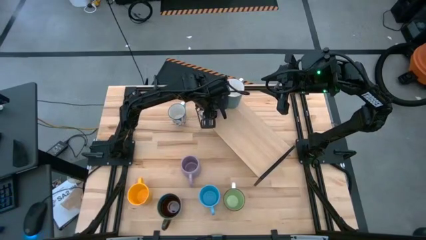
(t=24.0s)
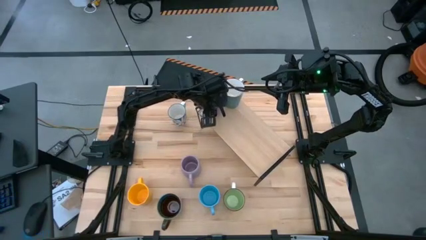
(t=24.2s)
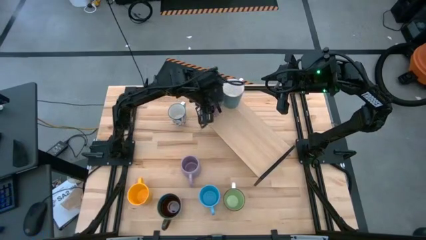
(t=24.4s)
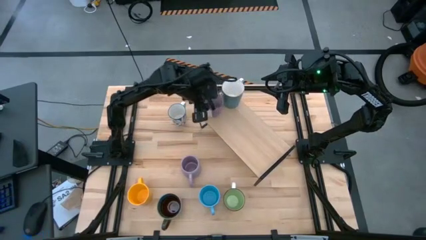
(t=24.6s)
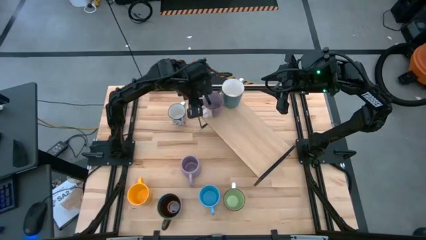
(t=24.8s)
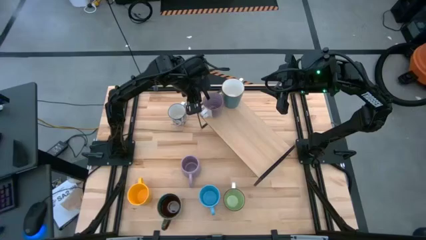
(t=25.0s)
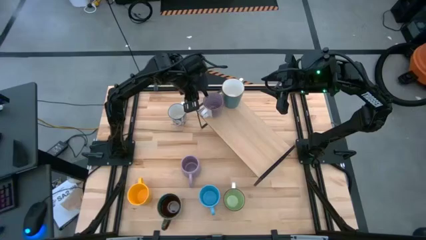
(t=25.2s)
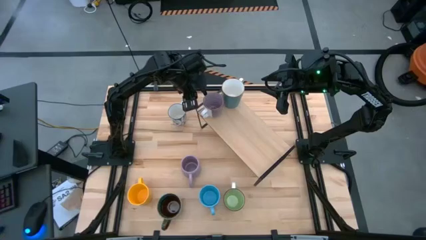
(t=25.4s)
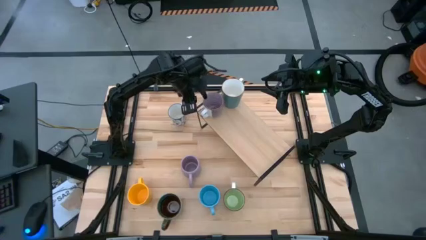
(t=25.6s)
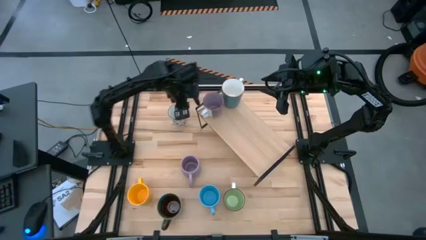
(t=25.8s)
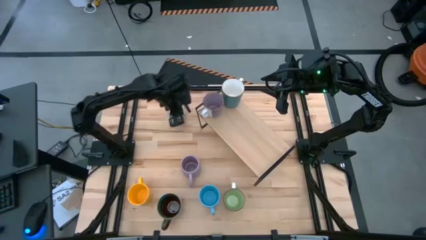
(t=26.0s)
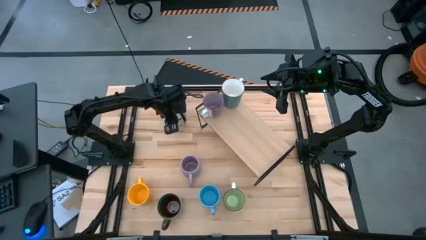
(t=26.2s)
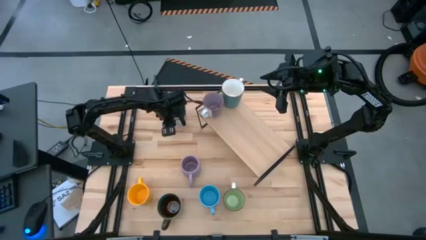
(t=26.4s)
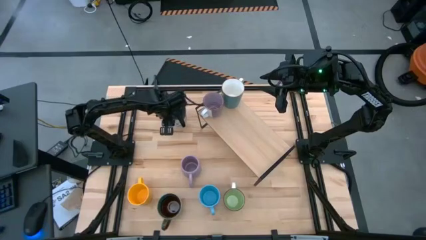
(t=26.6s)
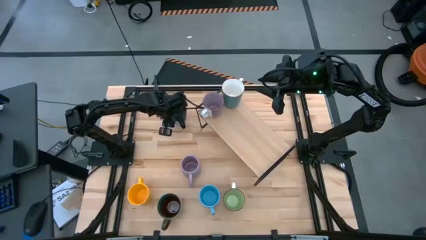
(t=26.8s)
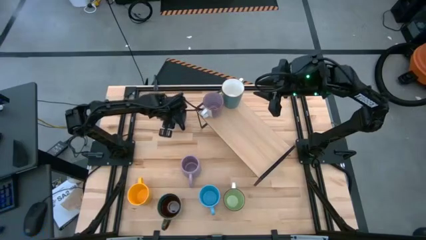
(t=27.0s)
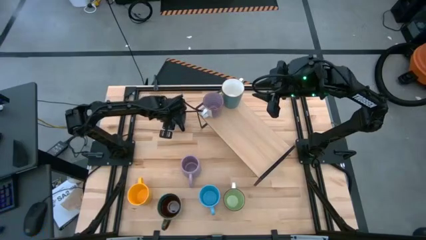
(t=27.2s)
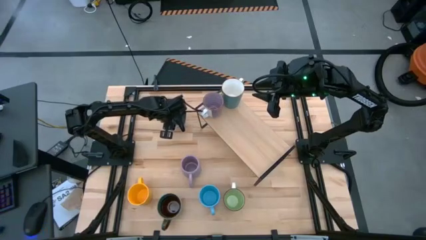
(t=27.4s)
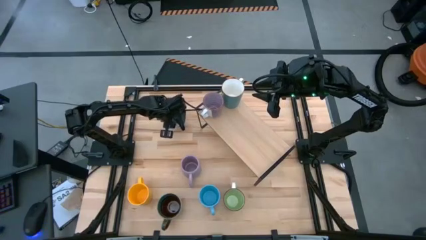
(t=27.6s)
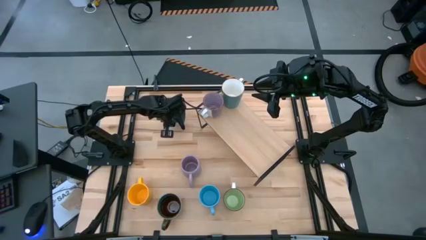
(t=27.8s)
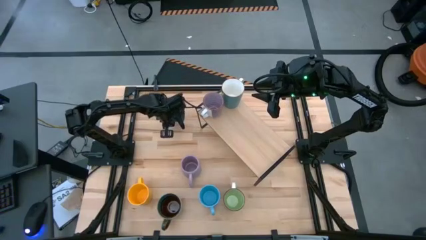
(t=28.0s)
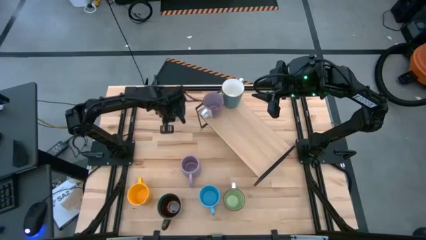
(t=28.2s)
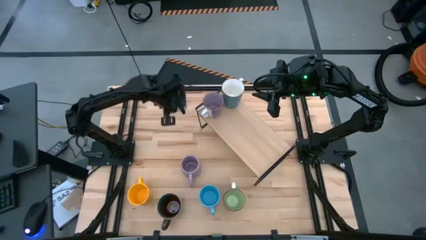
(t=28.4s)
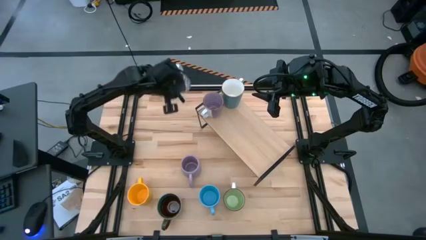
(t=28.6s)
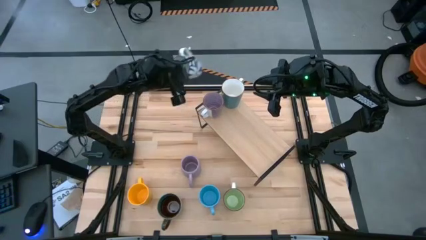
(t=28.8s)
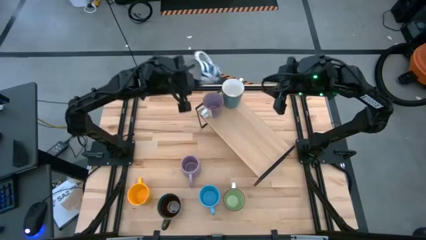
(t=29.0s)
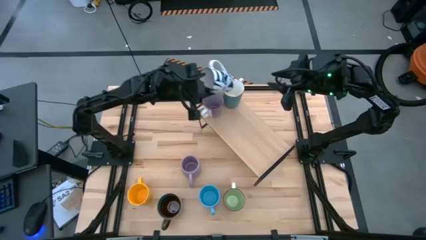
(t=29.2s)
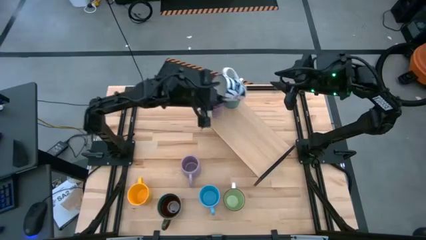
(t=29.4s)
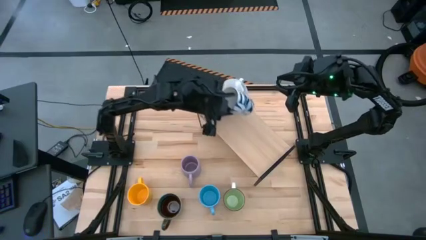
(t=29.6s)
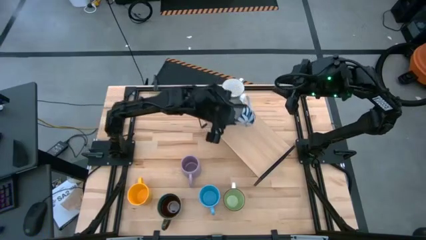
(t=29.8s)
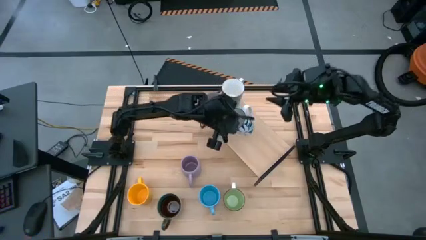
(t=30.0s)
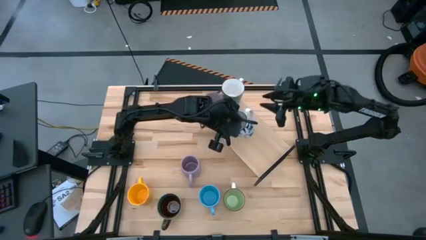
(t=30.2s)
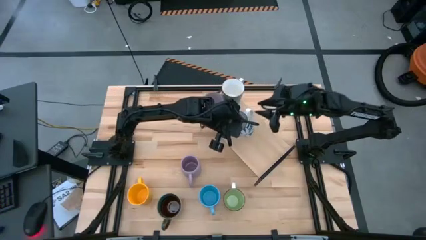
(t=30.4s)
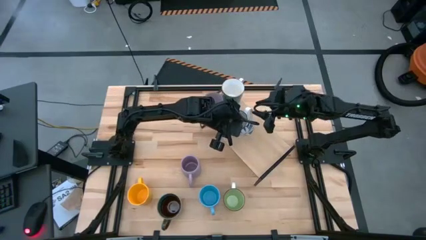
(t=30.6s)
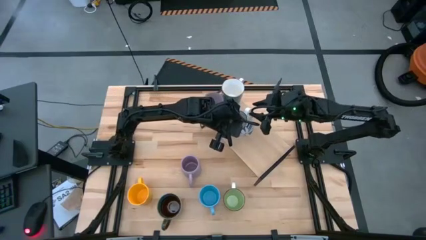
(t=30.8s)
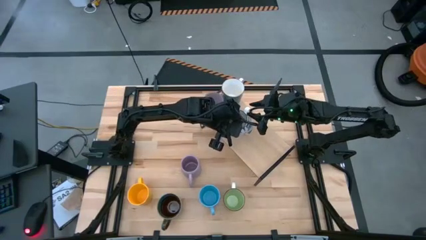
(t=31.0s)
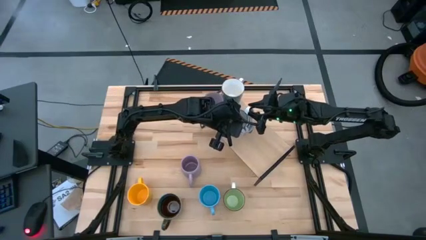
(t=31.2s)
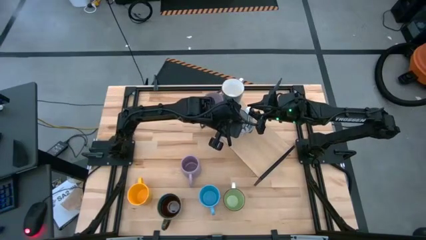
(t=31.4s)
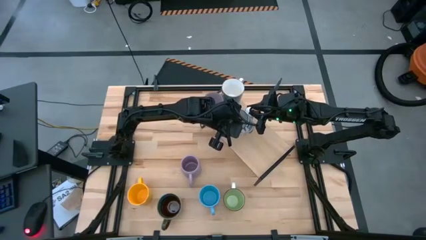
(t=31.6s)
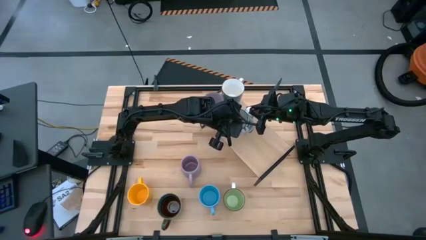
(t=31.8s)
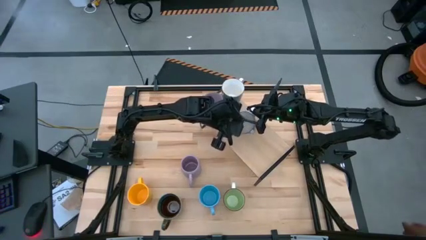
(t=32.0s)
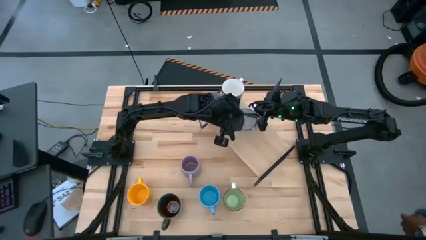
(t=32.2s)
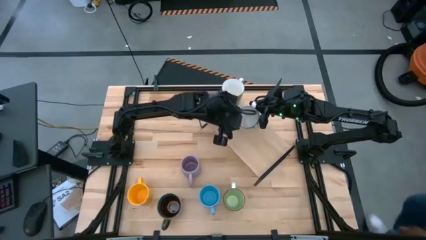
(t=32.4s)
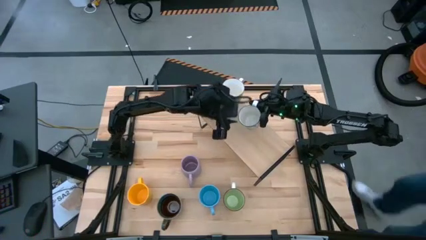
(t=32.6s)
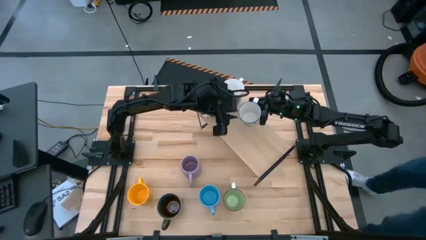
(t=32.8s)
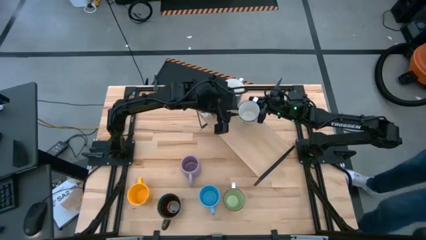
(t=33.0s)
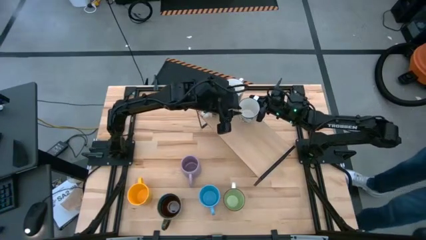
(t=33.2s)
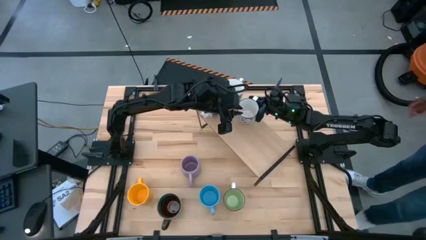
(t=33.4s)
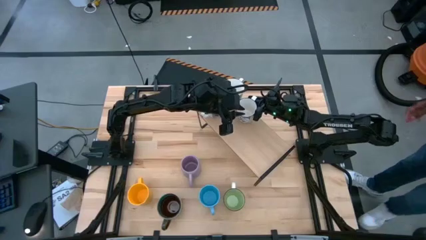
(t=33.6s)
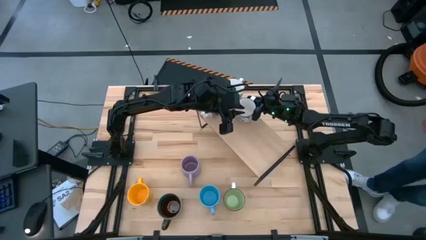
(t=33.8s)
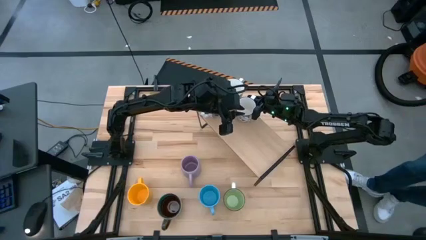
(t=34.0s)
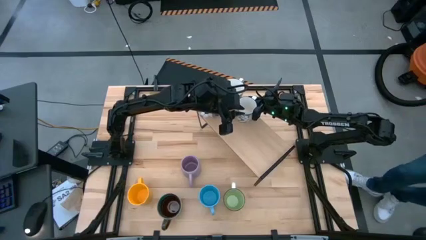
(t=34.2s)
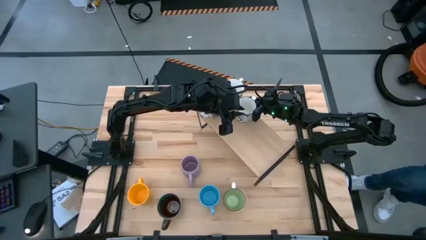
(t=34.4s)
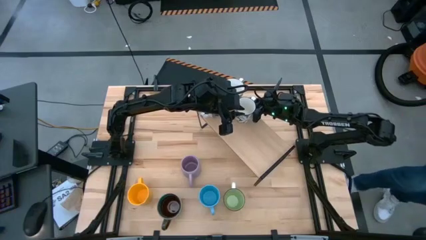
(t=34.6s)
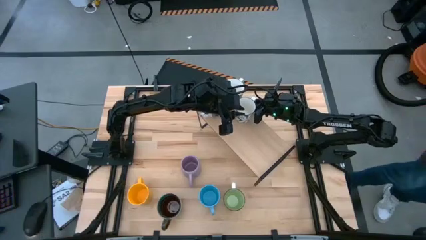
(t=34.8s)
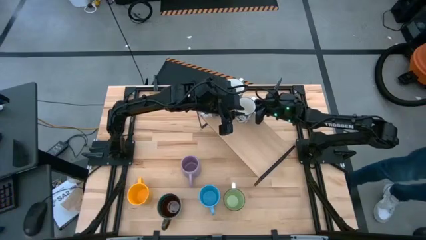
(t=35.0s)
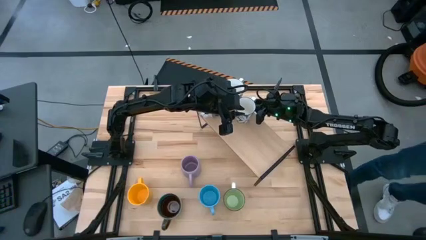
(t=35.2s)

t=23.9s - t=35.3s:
Task: Place coffee mugs
Put the white mug on the shelf
